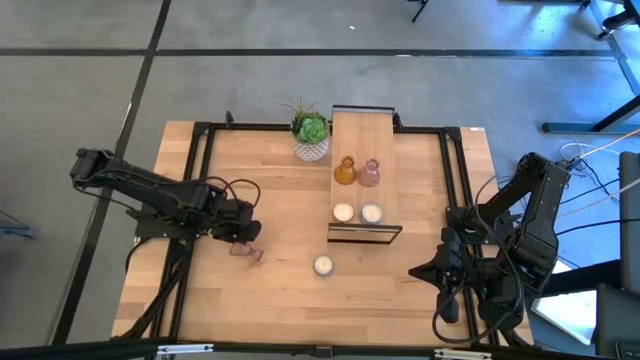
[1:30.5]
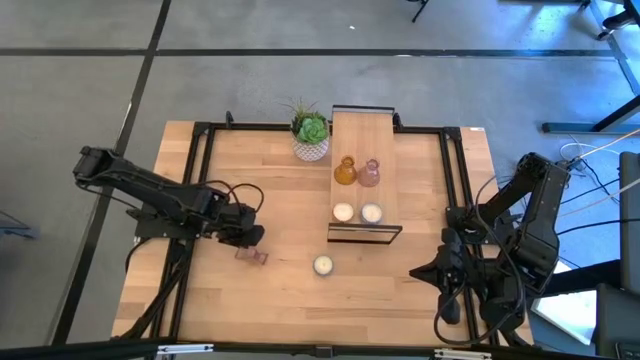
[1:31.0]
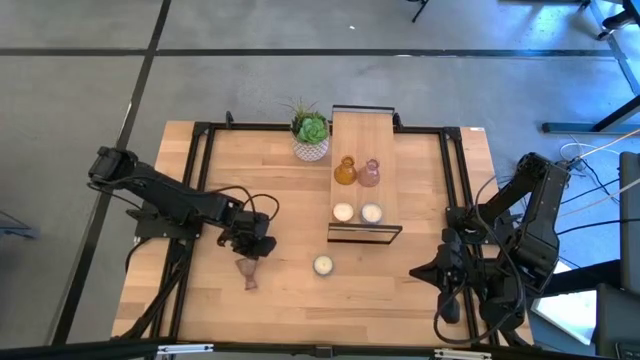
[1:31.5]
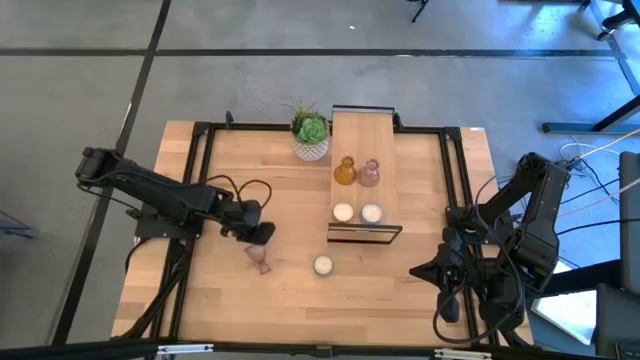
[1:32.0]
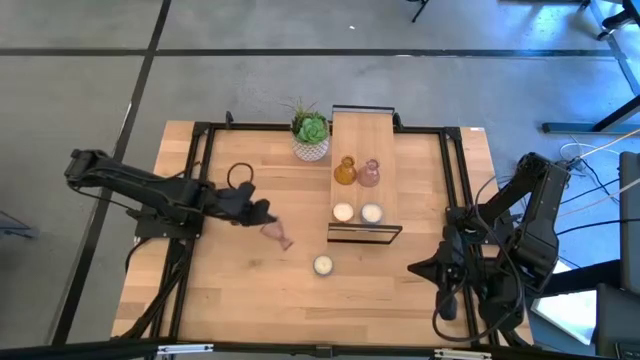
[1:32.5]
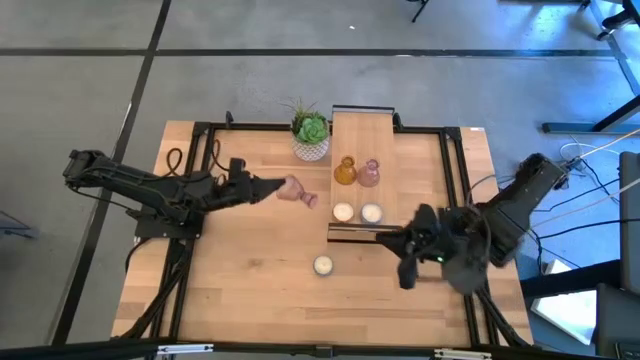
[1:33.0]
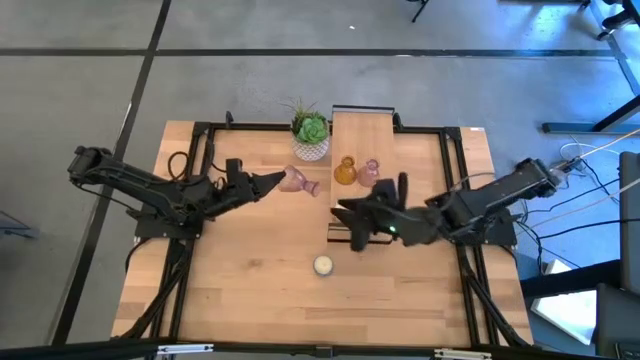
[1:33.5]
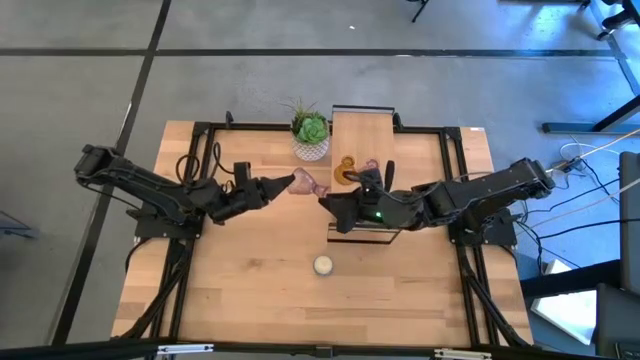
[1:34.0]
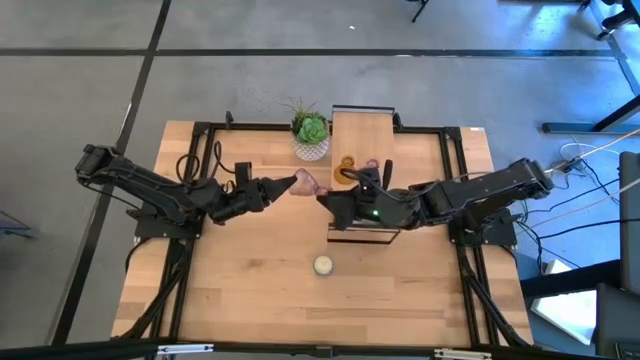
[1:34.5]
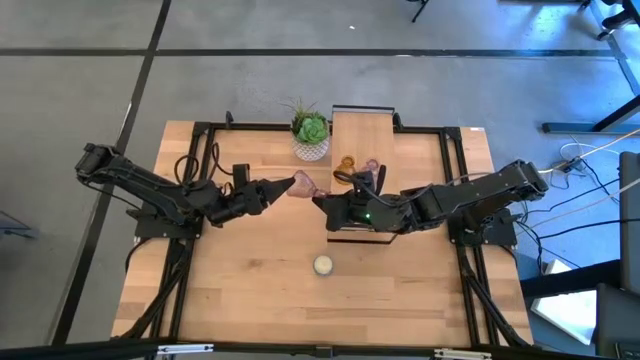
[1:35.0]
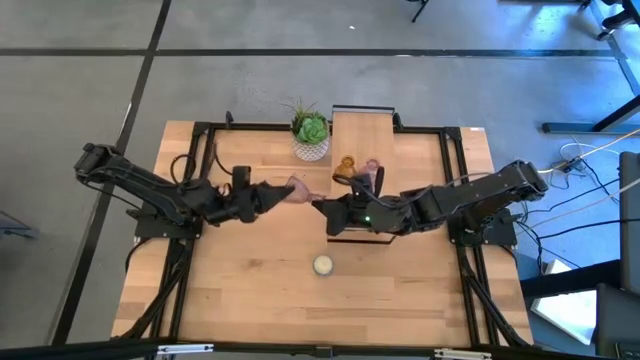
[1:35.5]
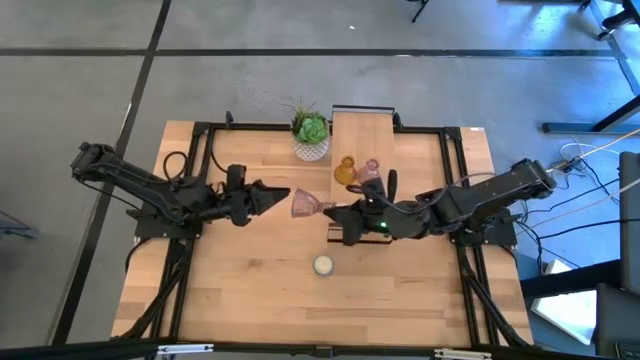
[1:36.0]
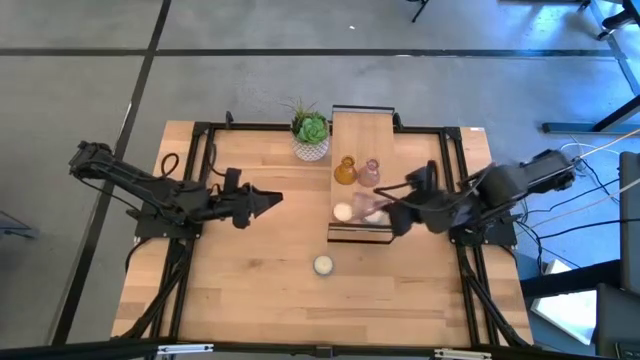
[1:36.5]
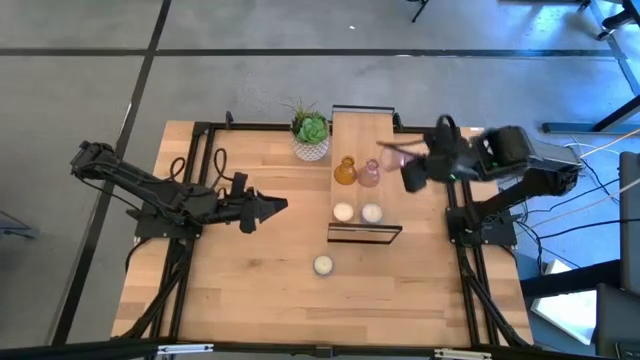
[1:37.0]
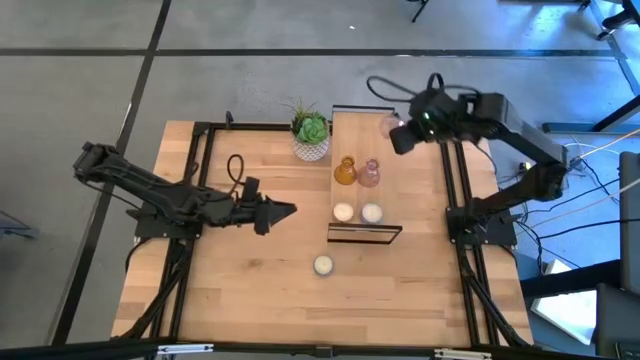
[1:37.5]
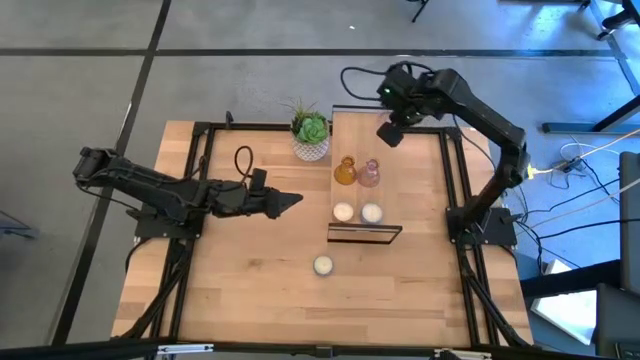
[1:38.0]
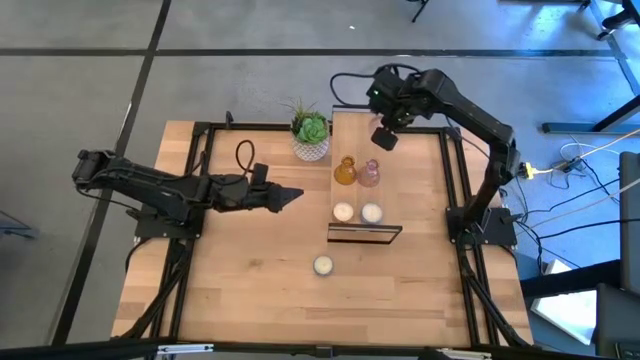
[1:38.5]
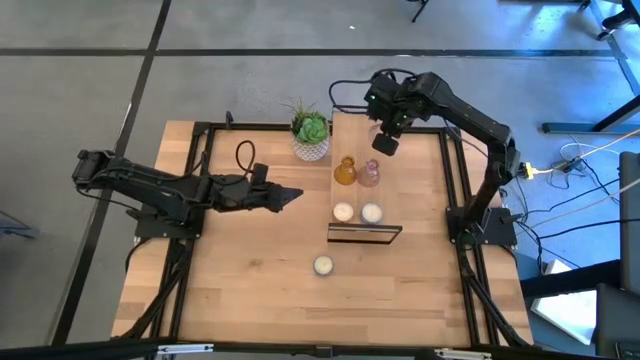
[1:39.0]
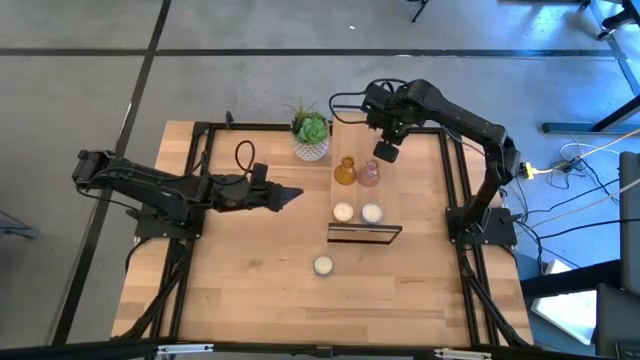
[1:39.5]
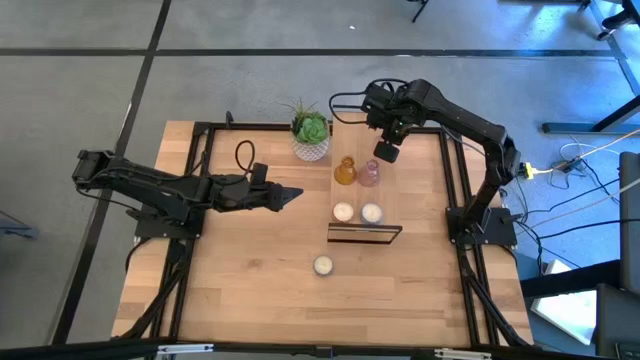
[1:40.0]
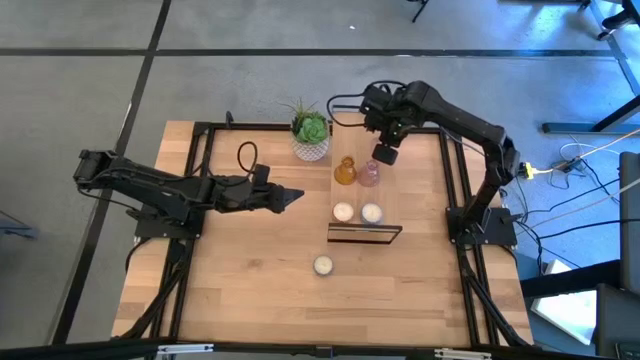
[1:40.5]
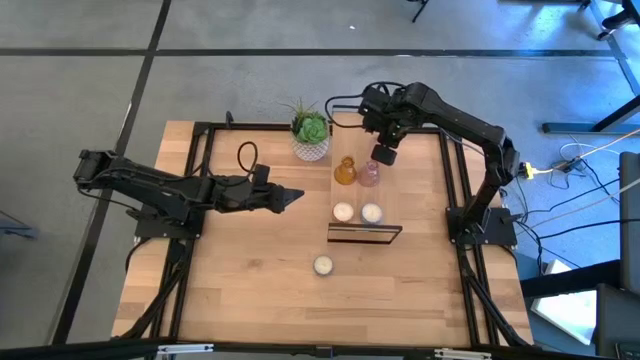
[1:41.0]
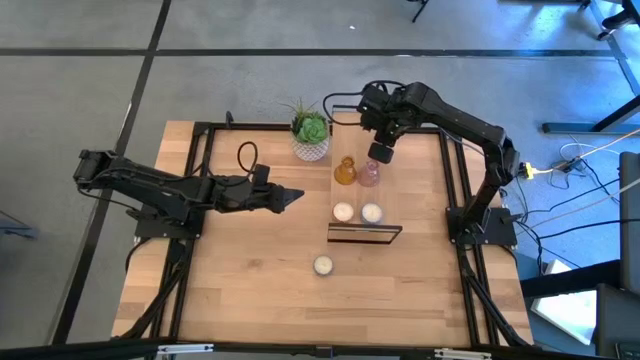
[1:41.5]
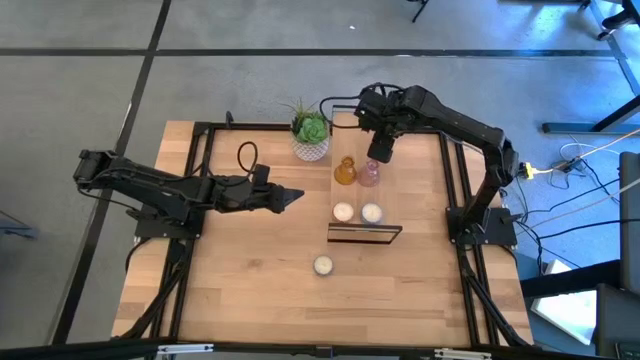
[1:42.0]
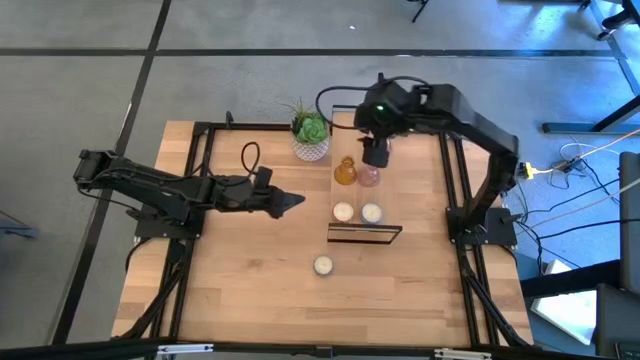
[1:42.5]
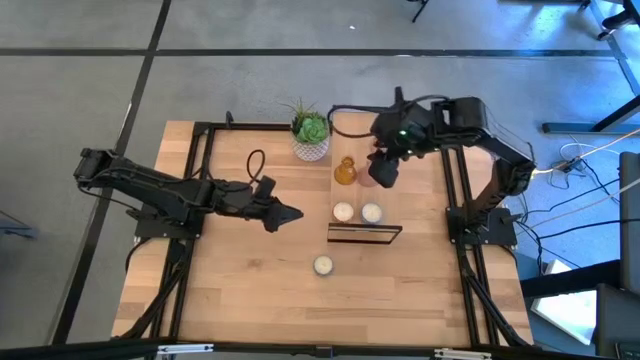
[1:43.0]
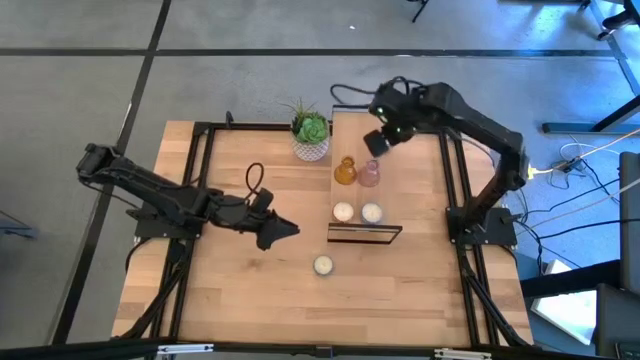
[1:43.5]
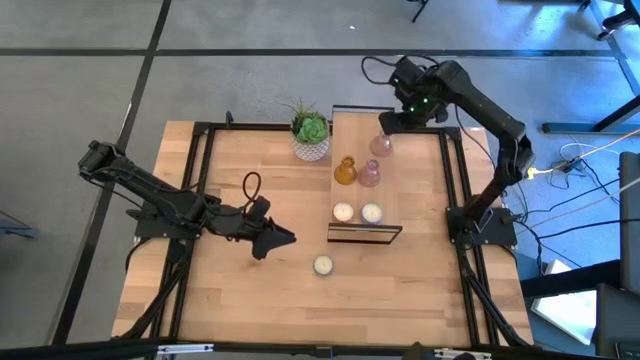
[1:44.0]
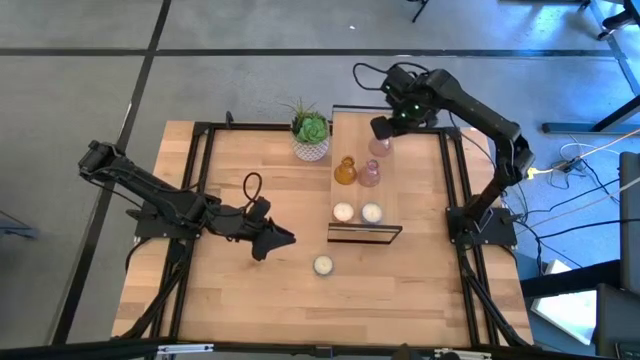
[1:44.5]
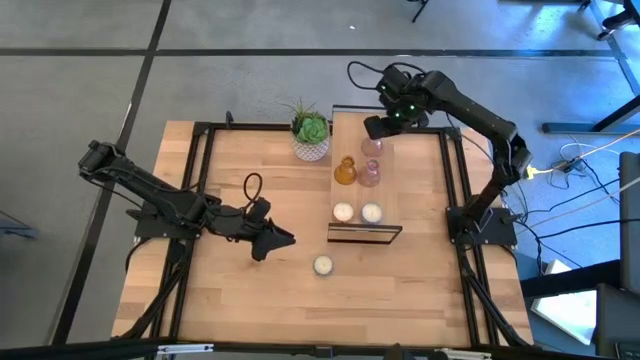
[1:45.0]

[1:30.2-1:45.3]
Task: Pick & Place candle stick holders
Put the pink glass candle holder on the shelf

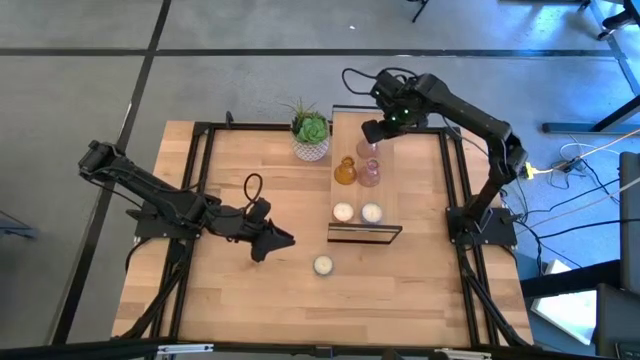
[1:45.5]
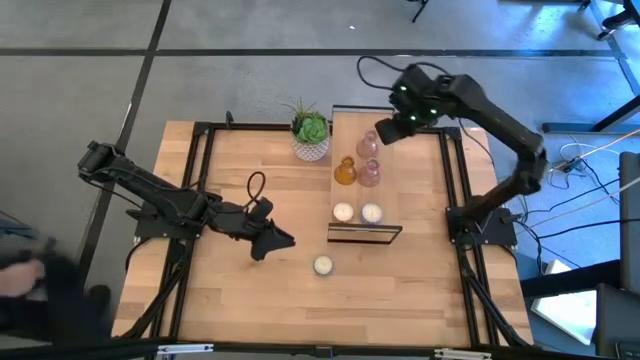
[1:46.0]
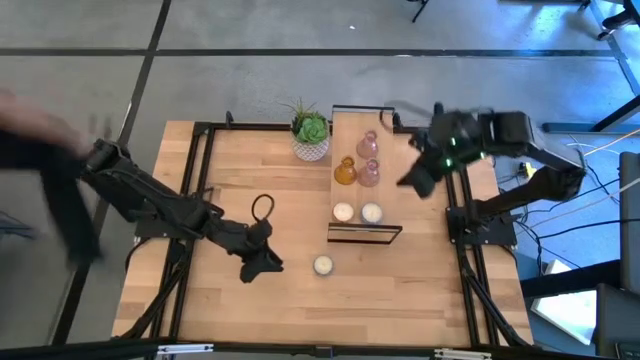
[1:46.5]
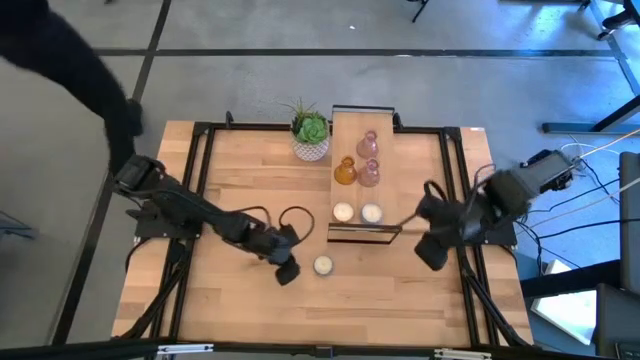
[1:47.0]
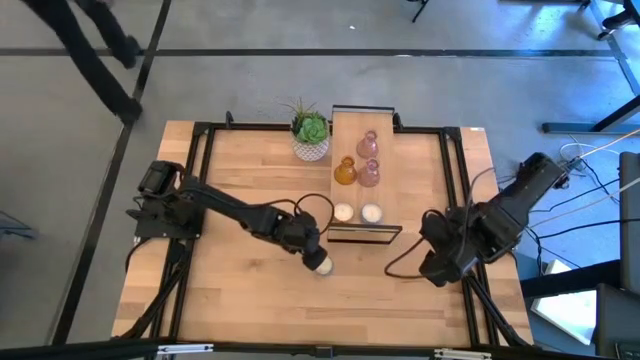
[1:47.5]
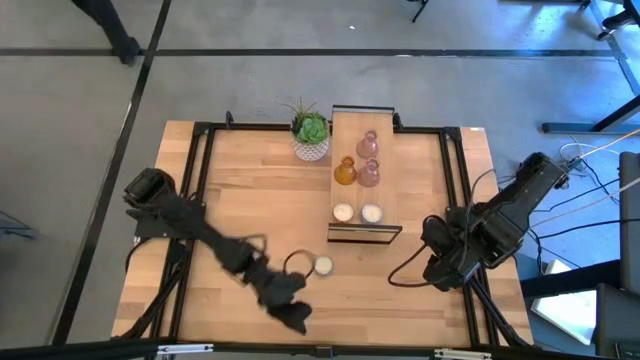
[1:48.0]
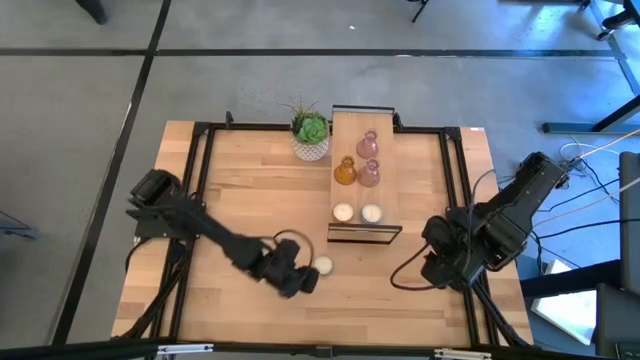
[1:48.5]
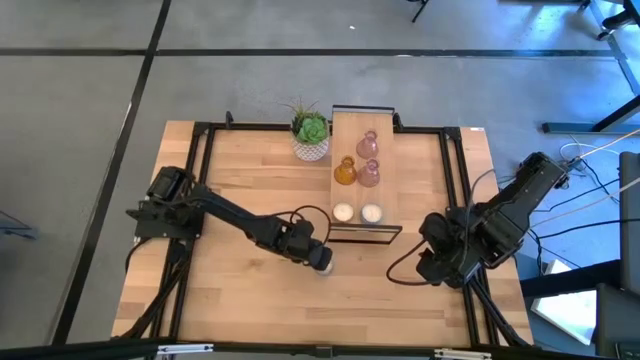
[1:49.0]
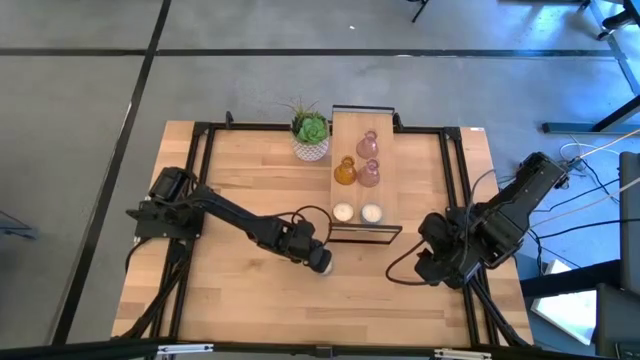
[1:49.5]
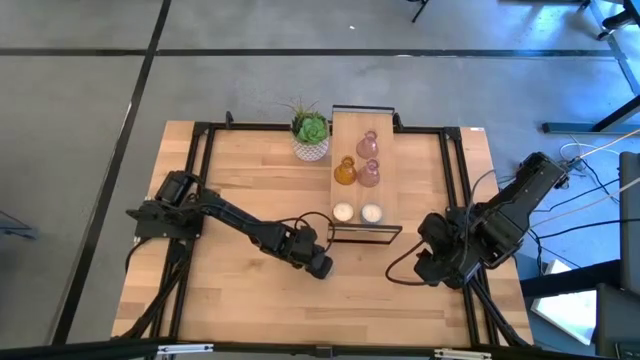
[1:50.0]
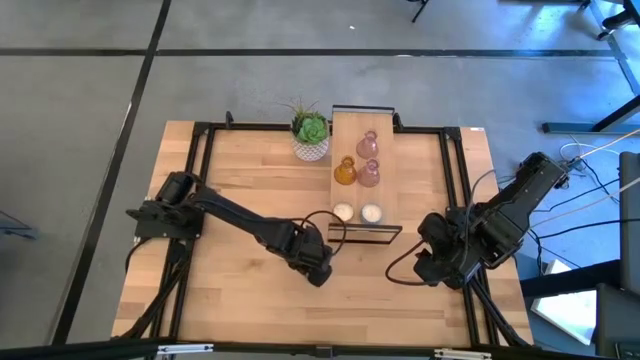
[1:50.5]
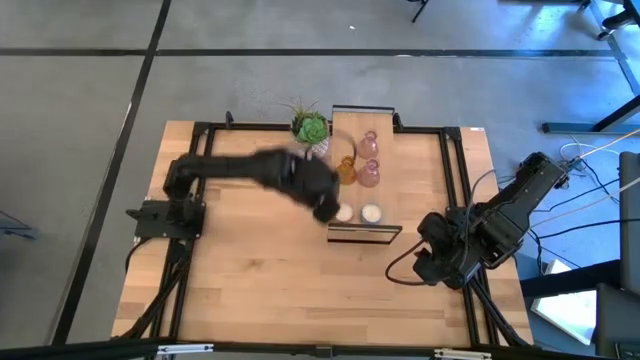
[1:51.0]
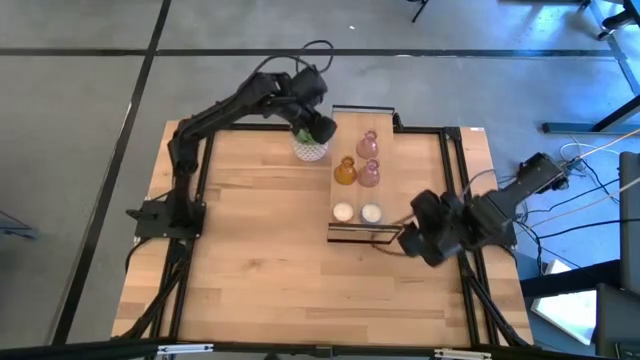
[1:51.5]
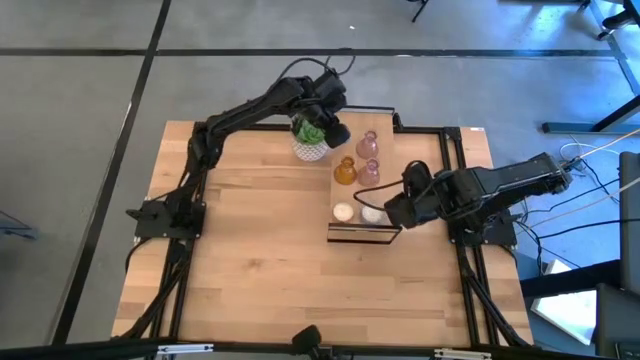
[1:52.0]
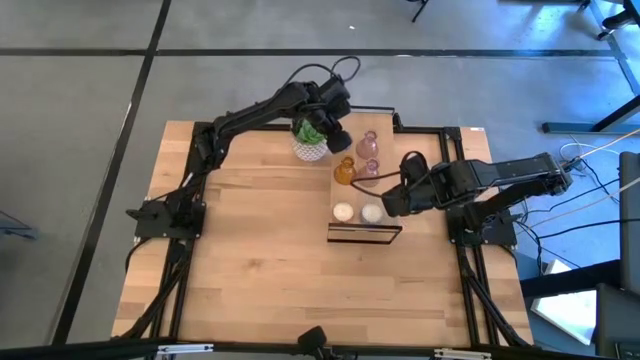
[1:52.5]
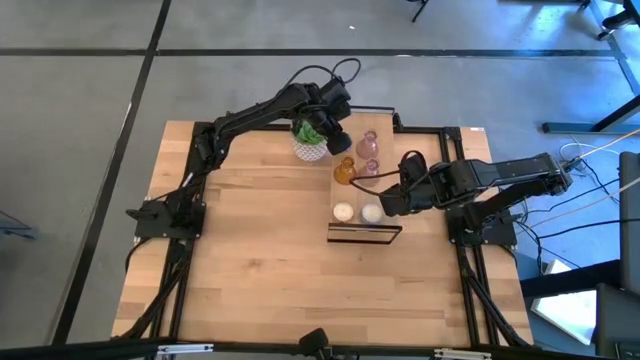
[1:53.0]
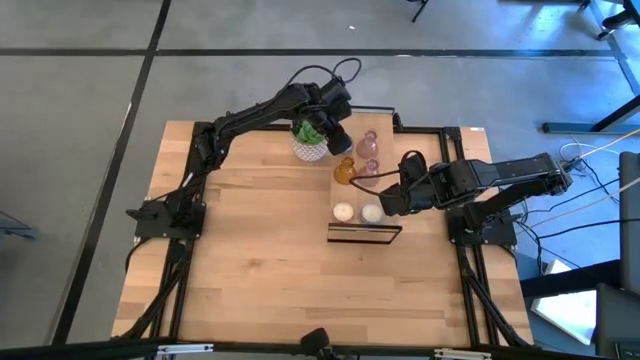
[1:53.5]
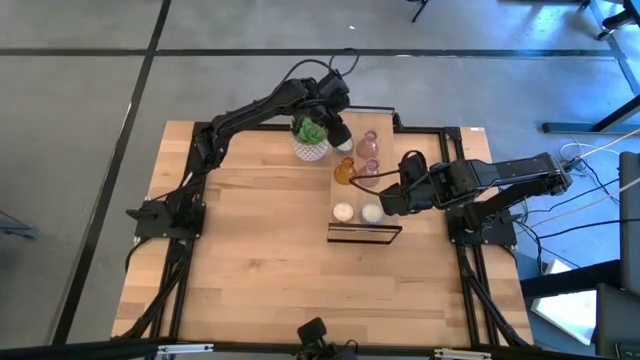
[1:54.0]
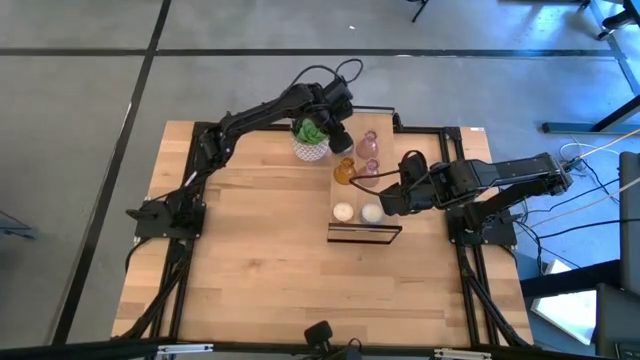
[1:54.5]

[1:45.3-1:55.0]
Put the blue patterned scented candle on the shelf aligned with the pink glass candle holder
